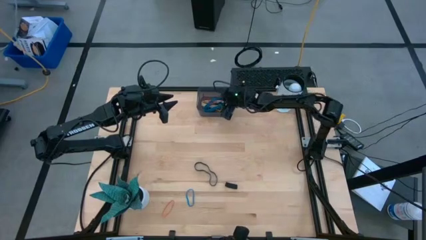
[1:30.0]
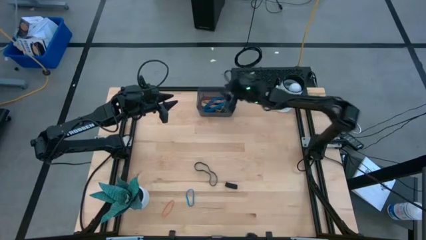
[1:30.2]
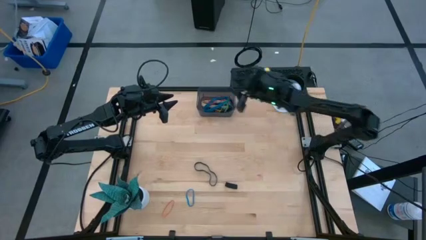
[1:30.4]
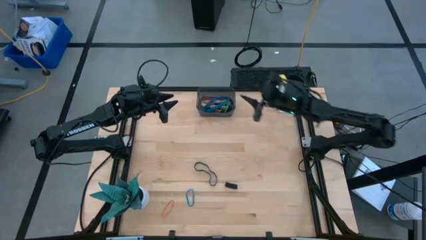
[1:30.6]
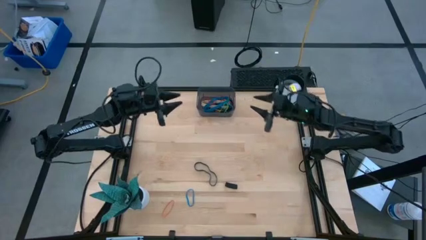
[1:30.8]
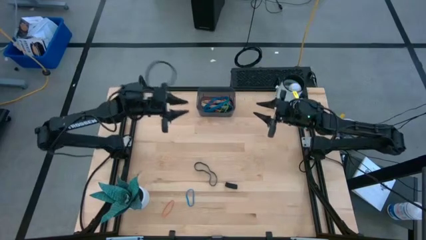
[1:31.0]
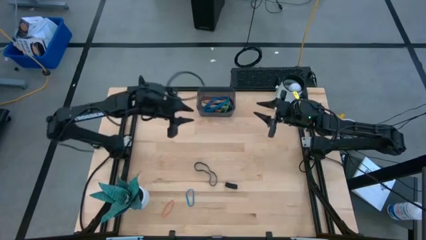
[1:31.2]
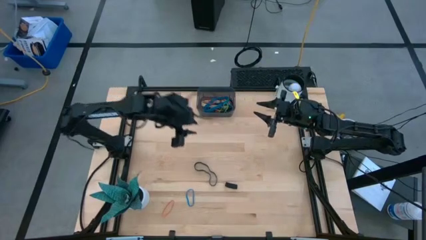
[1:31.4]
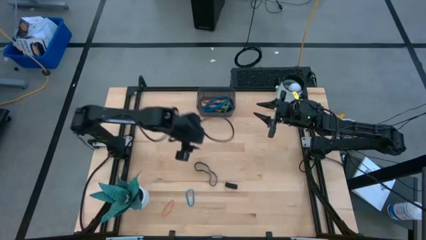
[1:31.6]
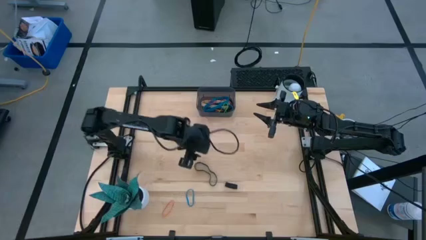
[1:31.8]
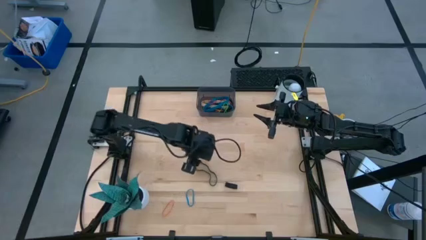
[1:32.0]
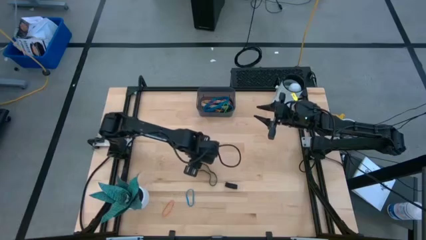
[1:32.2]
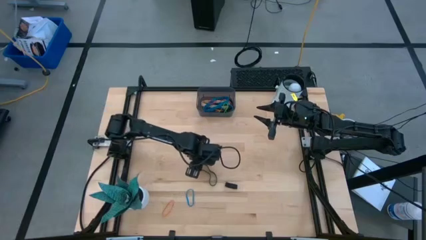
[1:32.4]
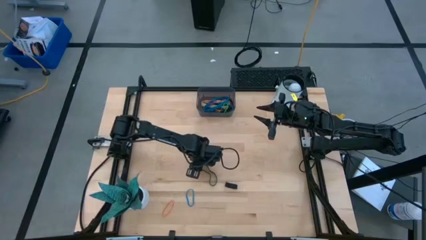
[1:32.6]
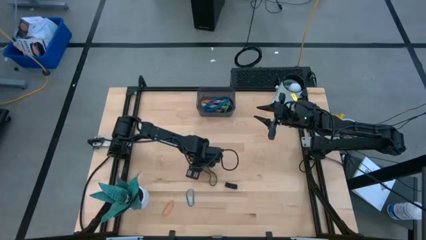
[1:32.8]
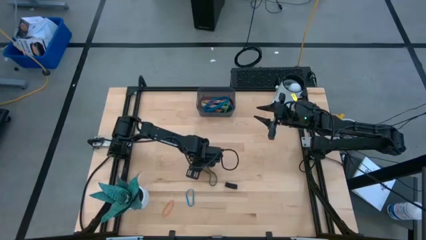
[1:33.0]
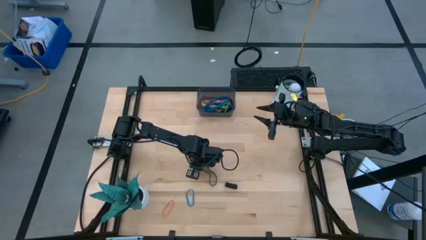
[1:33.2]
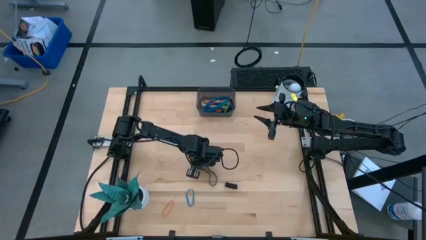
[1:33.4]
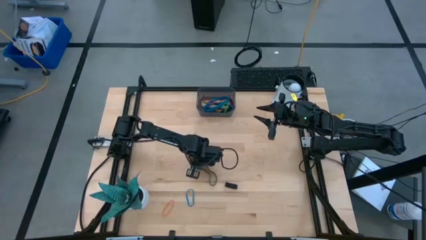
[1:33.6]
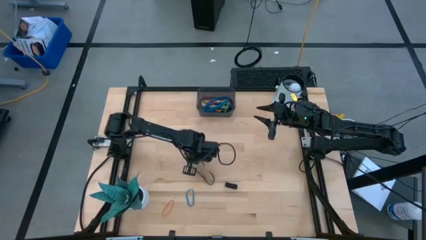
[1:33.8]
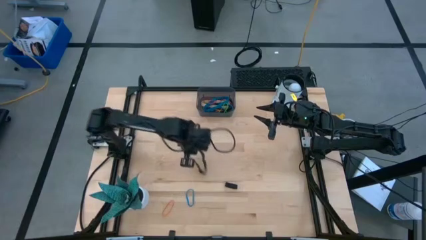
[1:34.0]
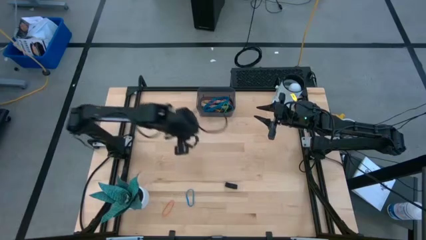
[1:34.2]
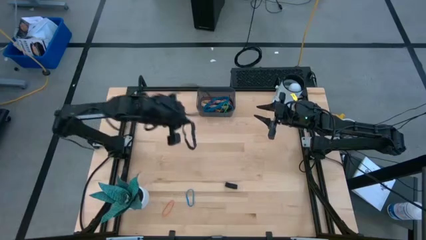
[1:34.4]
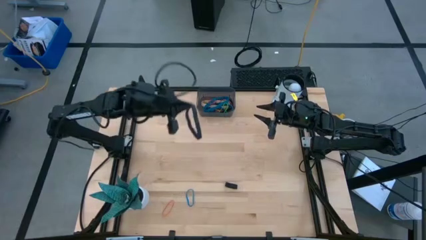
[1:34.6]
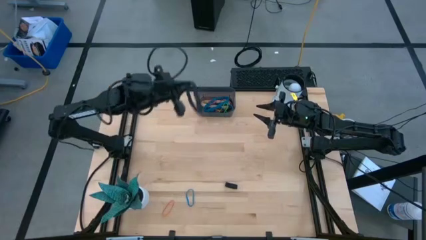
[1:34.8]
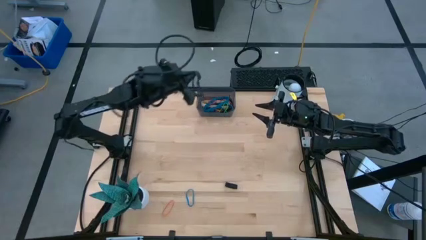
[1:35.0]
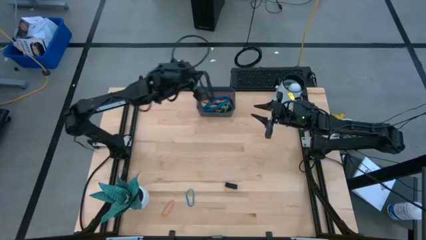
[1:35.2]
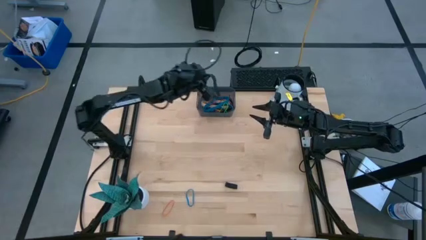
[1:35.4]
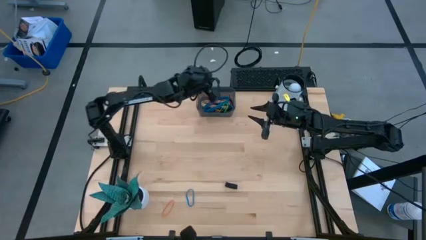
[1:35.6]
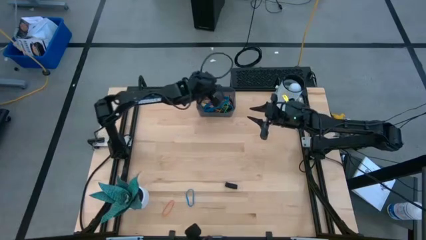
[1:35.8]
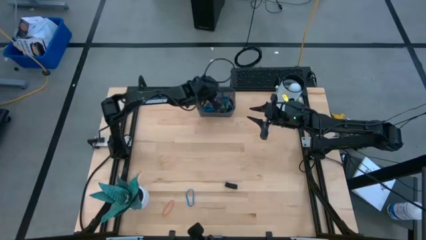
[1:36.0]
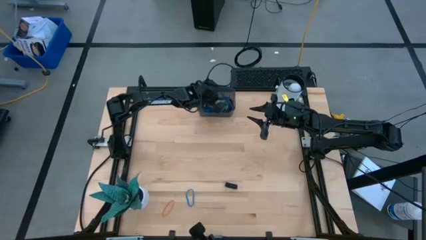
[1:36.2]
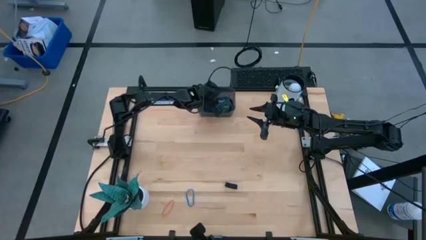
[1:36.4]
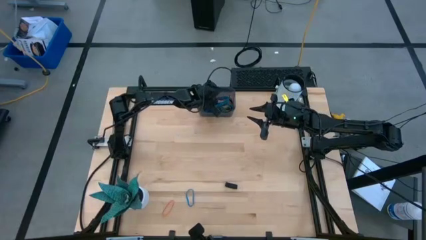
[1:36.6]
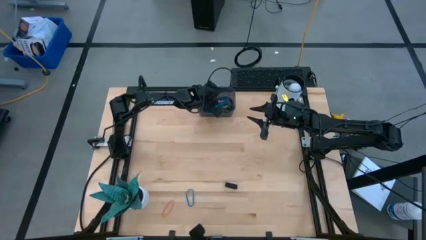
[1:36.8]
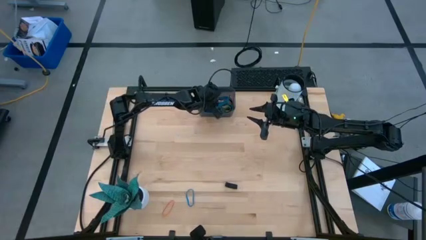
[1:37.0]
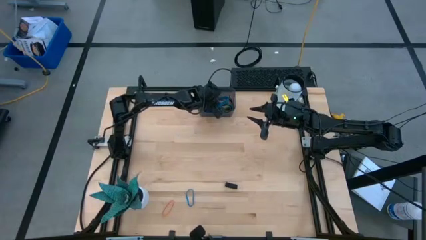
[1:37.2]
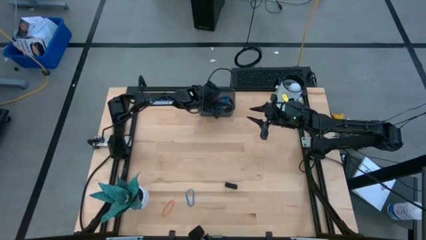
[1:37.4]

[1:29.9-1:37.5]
Task: Pick and place rubber bands into bin
Put the left black rubber band into the black bin

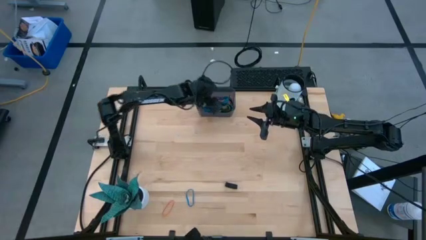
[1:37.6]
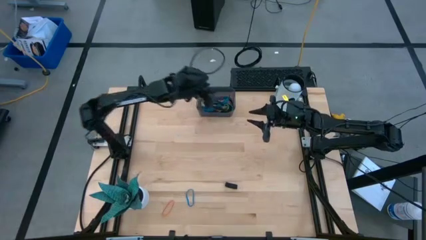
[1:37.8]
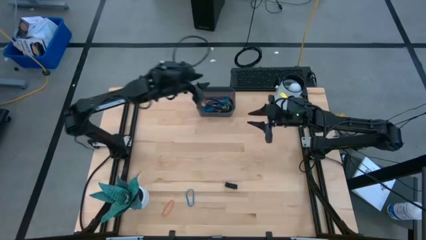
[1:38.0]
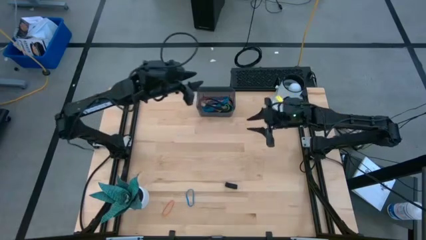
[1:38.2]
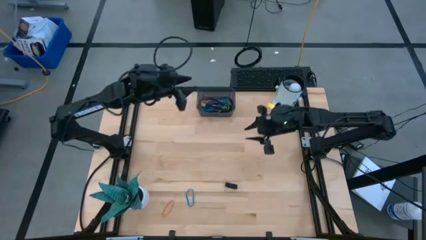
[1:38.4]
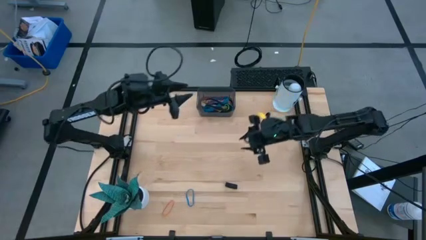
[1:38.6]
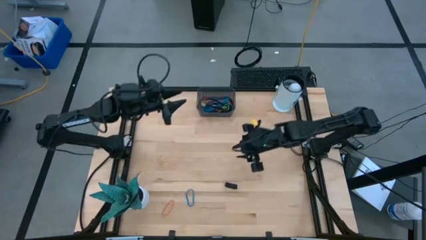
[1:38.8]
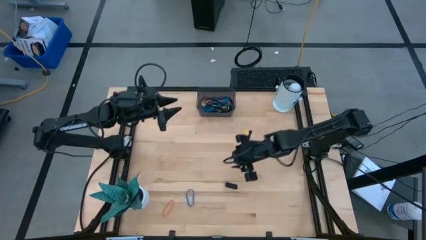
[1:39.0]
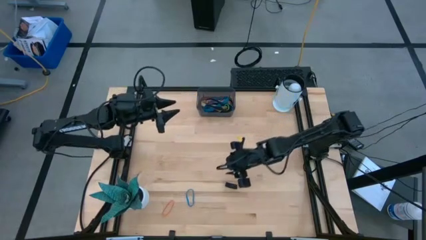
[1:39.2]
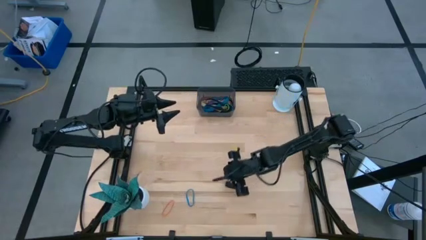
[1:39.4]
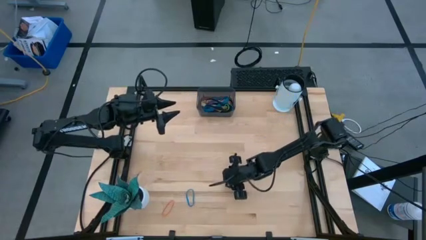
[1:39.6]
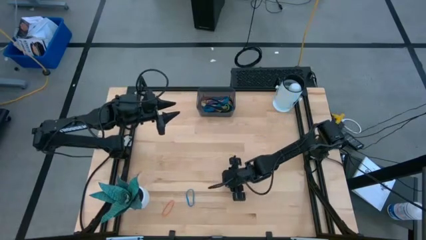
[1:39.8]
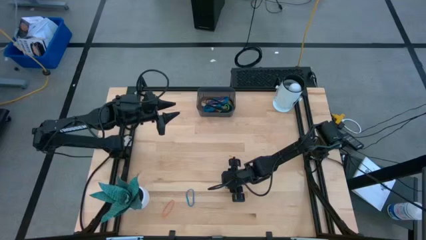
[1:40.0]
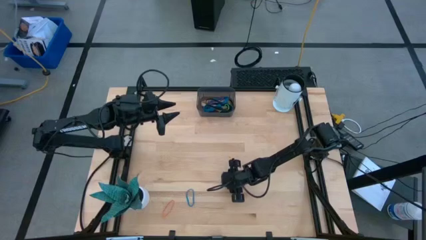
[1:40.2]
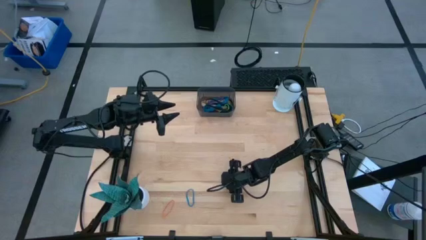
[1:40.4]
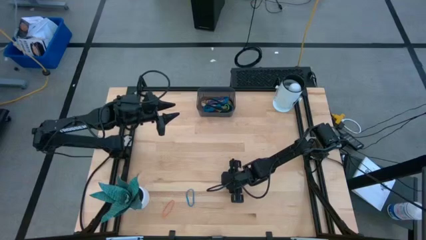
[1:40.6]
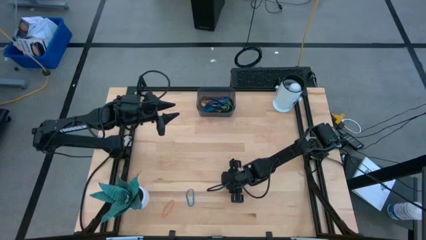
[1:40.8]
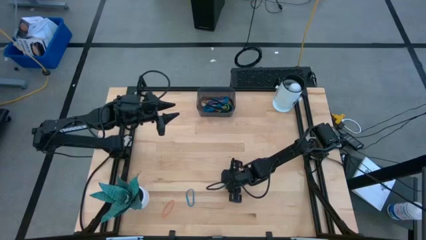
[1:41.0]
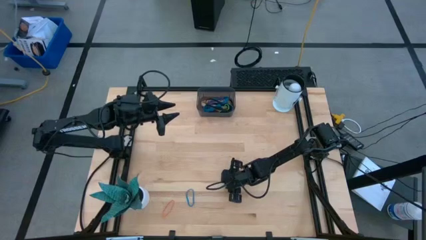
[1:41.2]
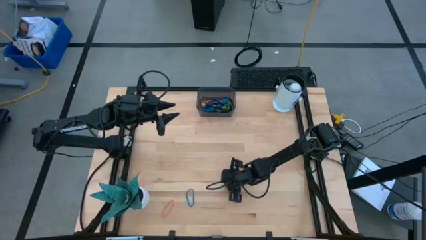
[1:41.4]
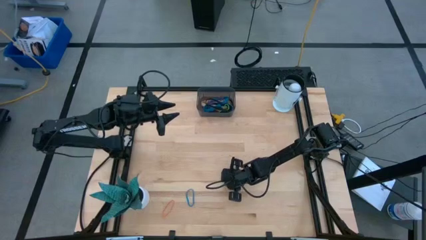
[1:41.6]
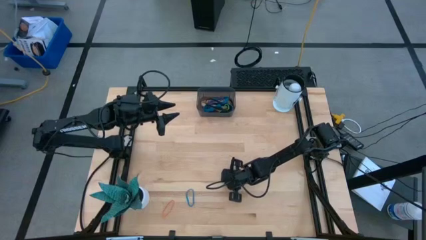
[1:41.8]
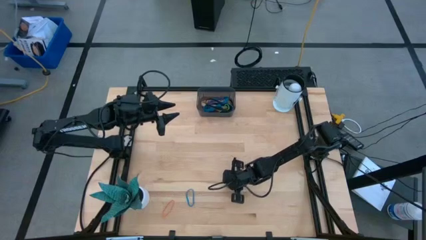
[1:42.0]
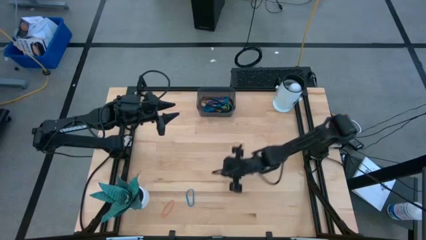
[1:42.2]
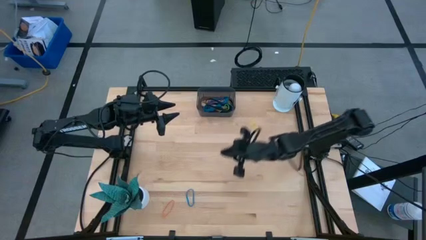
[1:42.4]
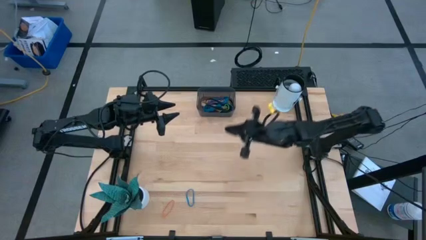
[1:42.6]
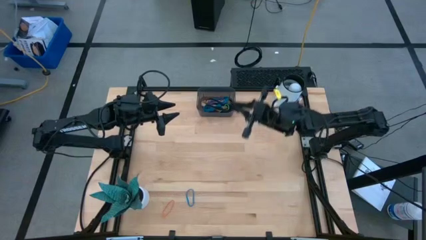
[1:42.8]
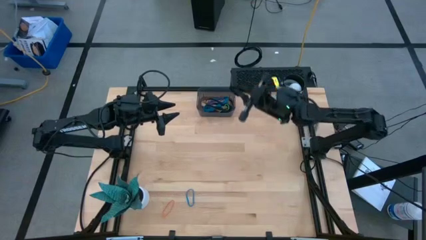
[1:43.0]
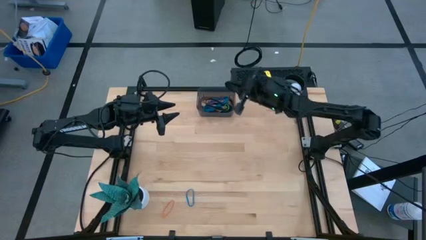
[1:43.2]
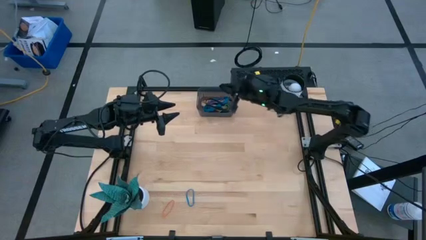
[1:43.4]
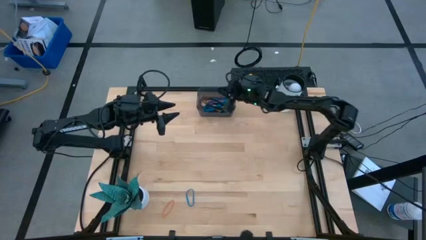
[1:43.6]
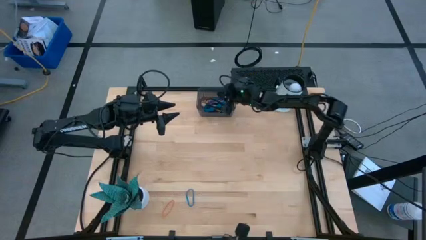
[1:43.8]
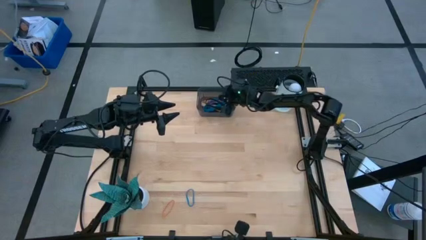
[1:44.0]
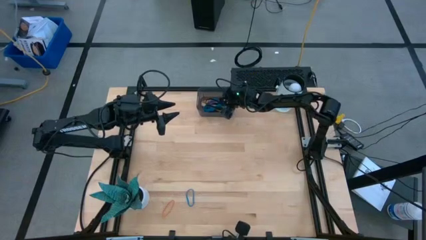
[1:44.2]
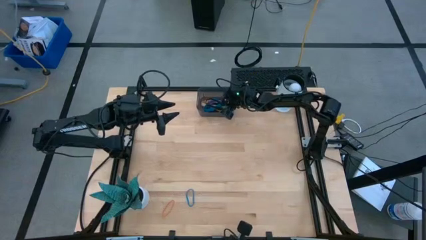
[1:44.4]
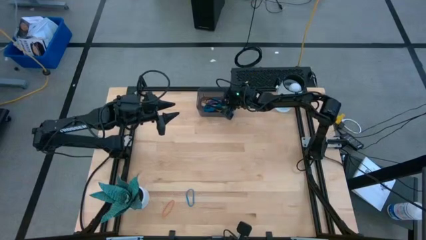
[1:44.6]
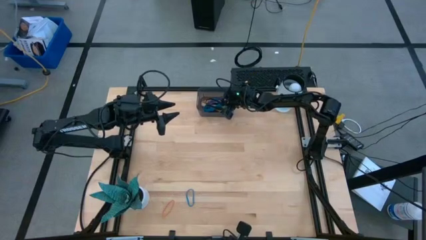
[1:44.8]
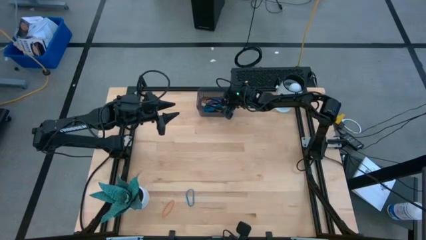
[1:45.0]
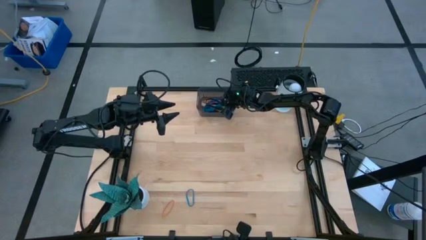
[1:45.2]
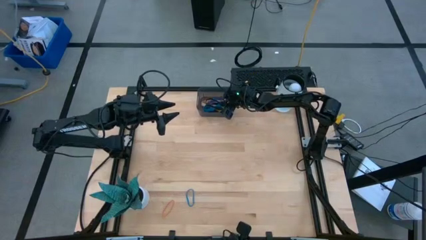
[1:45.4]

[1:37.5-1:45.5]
Put the black rubber band into the black bin
